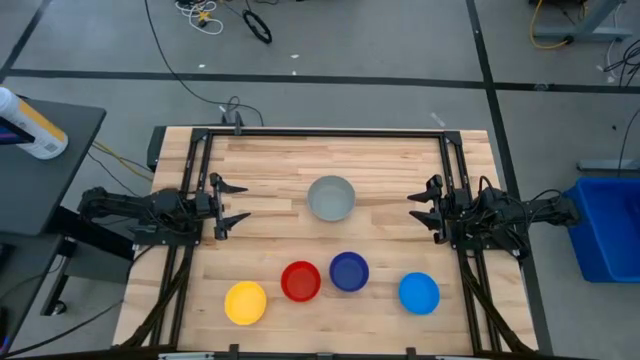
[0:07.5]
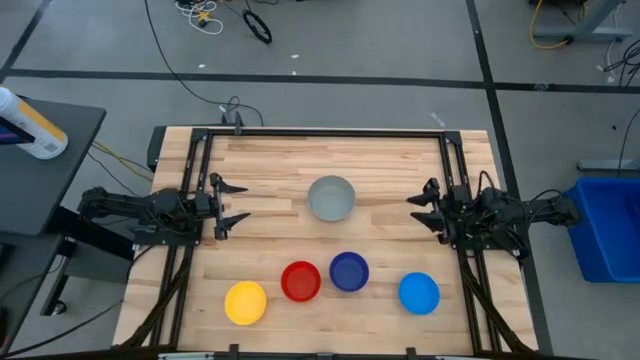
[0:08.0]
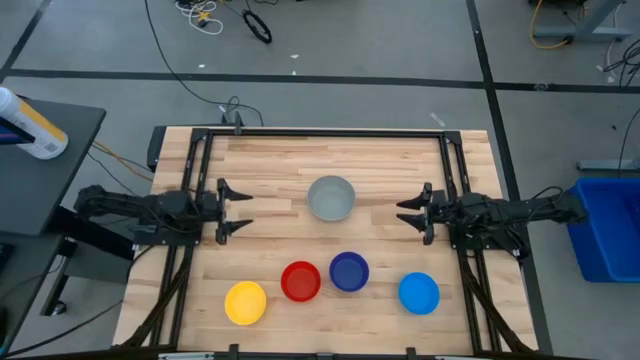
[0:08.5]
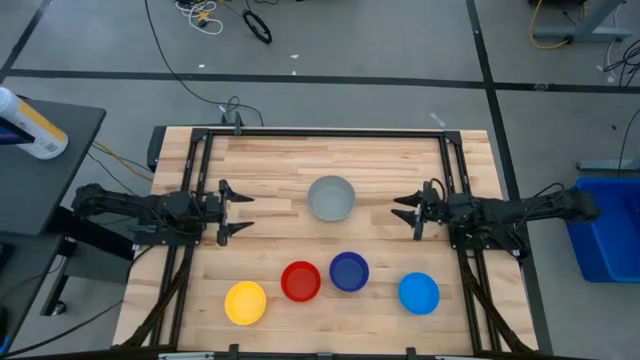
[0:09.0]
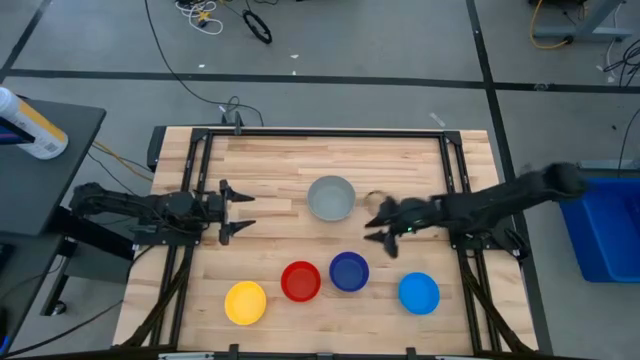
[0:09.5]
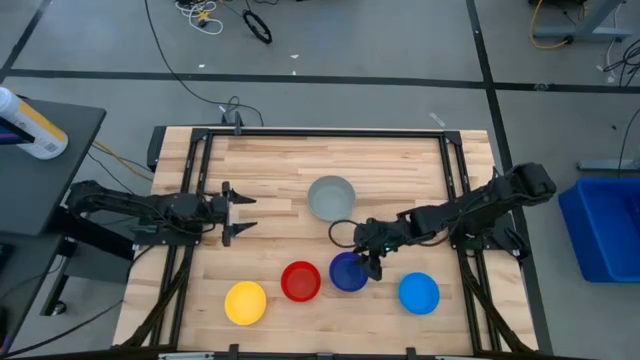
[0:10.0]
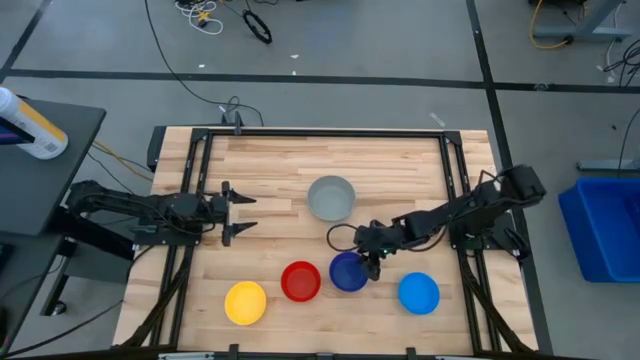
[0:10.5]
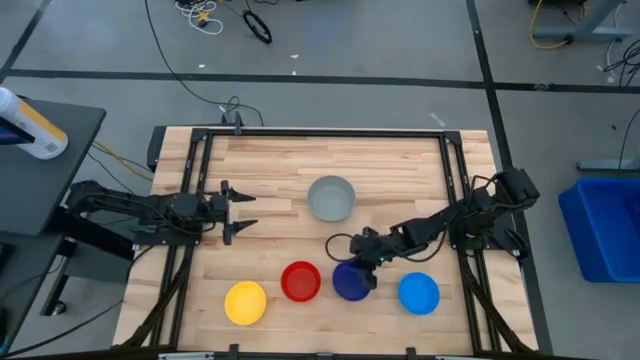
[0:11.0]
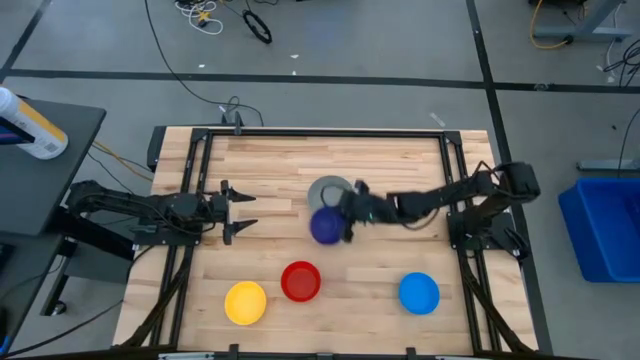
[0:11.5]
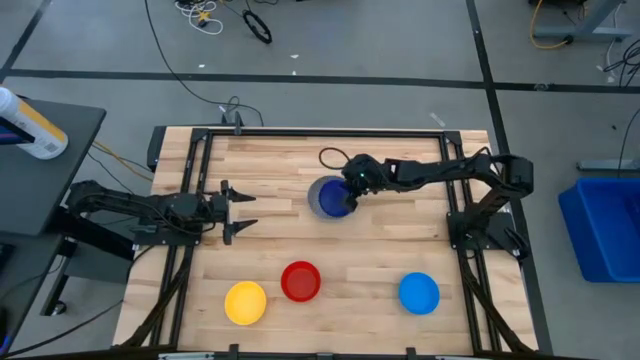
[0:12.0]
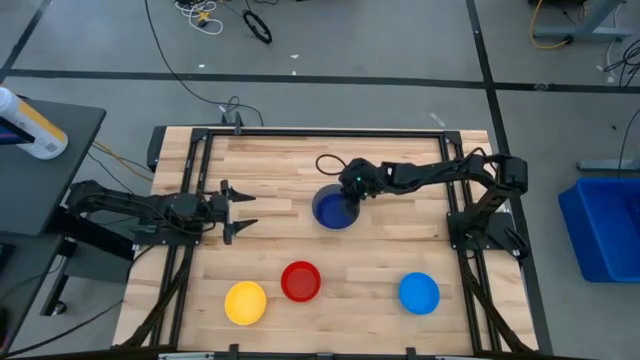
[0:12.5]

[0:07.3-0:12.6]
Stack the blue bowl on top of the gray bowl

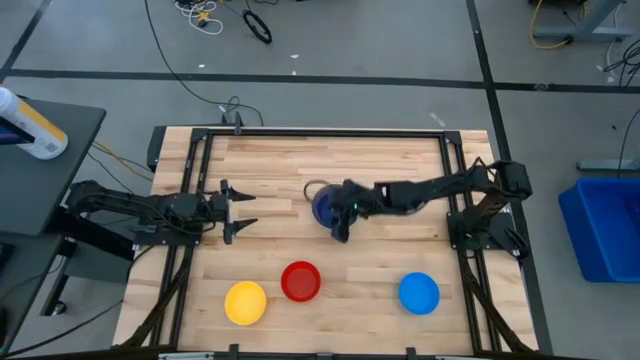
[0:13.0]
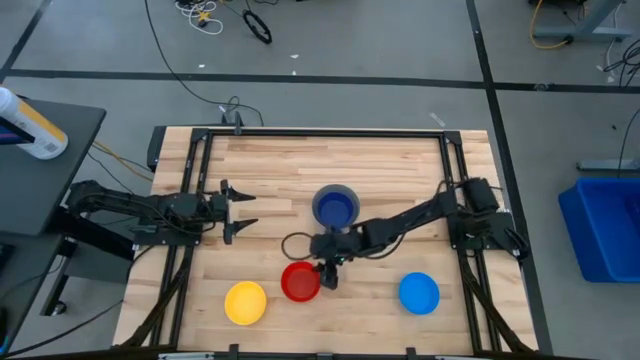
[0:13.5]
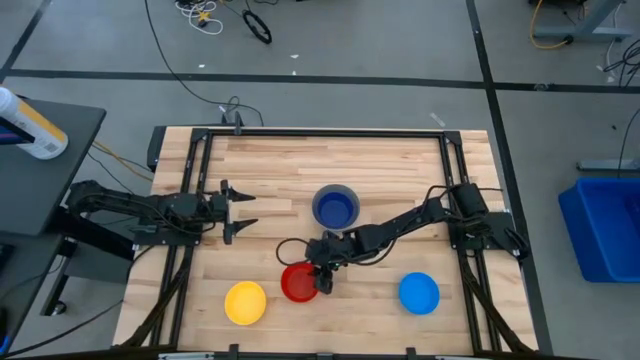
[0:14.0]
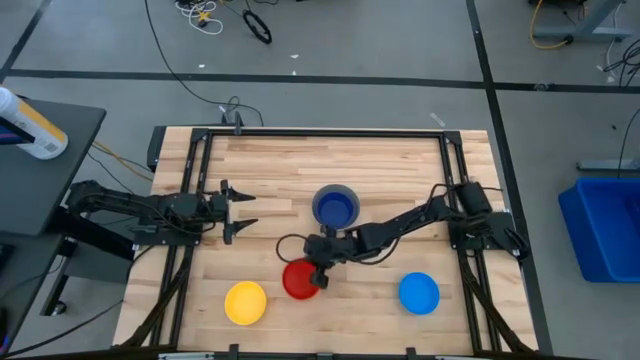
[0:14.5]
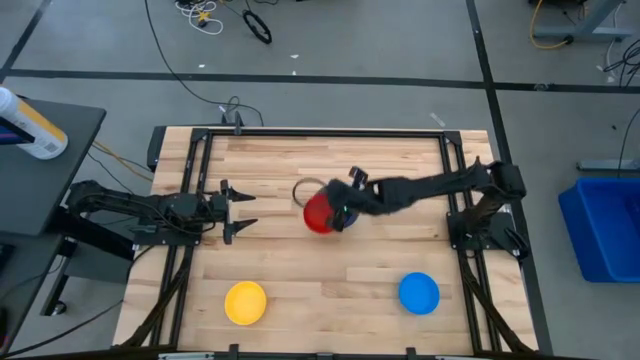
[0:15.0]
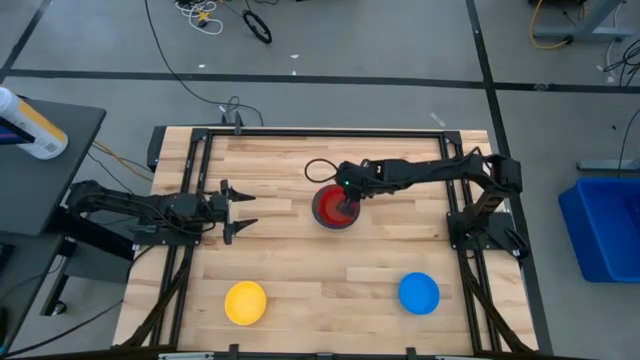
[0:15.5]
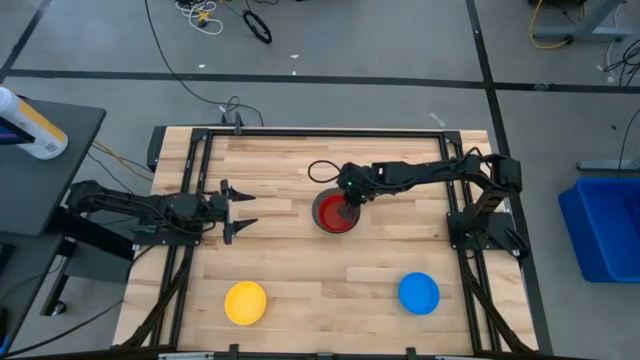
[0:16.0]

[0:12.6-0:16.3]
Stack the red bowl on top of the blue bowl

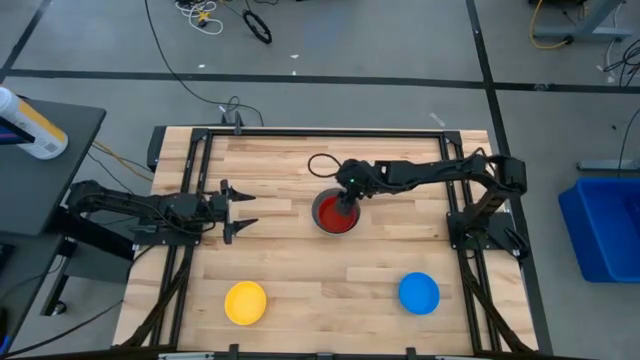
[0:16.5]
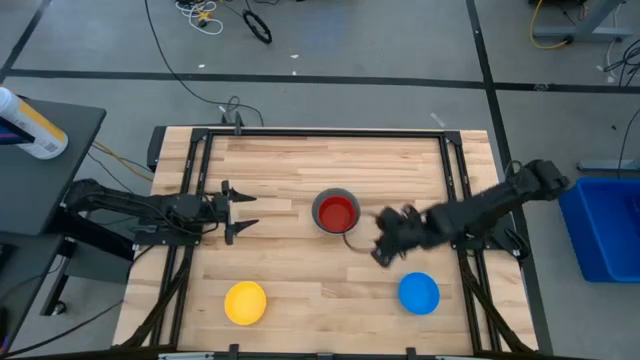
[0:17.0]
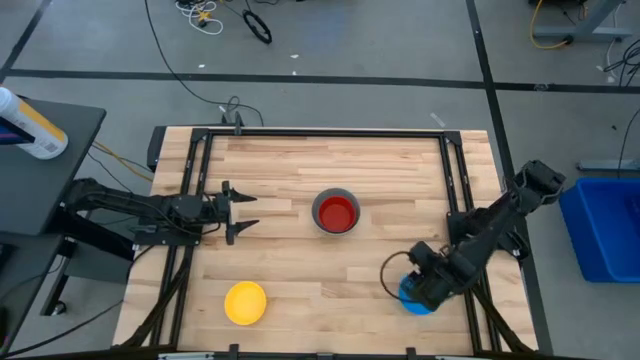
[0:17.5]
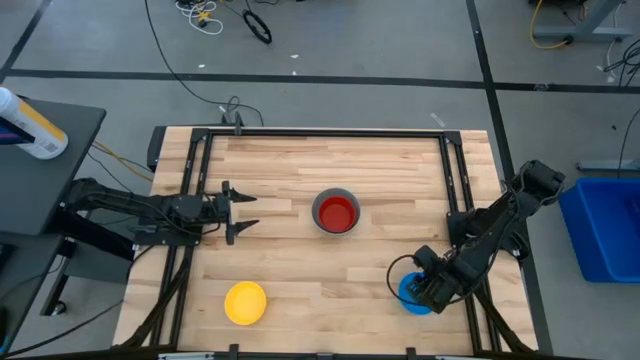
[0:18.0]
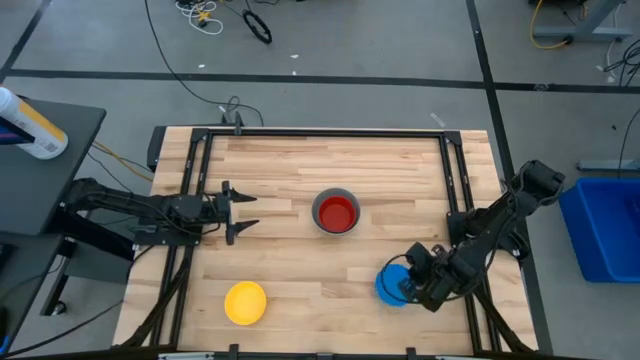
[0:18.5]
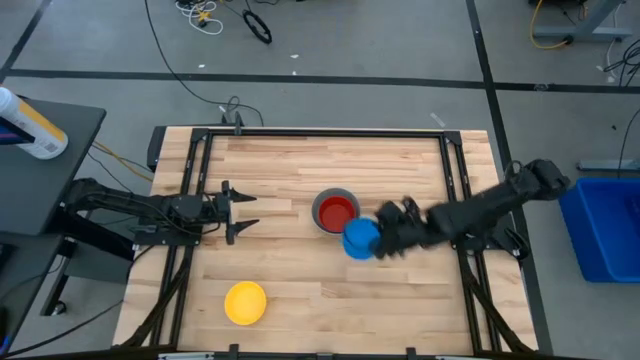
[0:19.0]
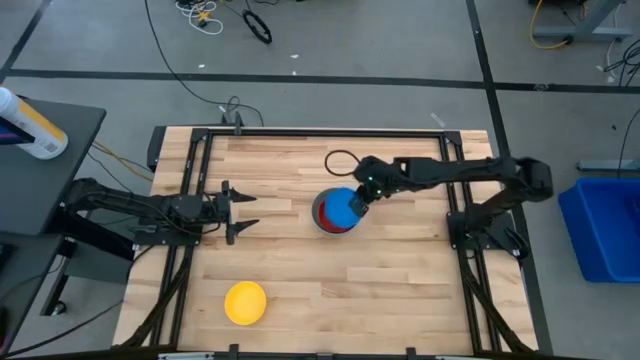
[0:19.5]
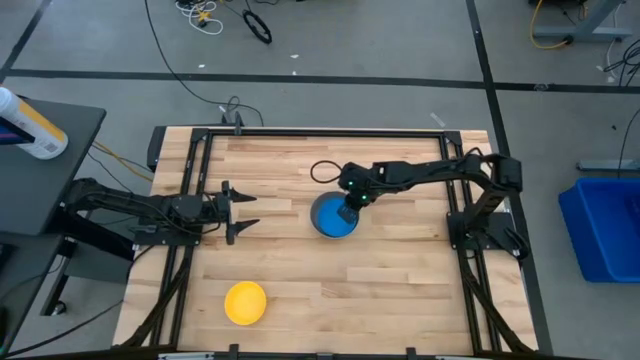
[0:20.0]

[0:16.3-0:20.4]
Stack the light blue bowl on top of the red bowl

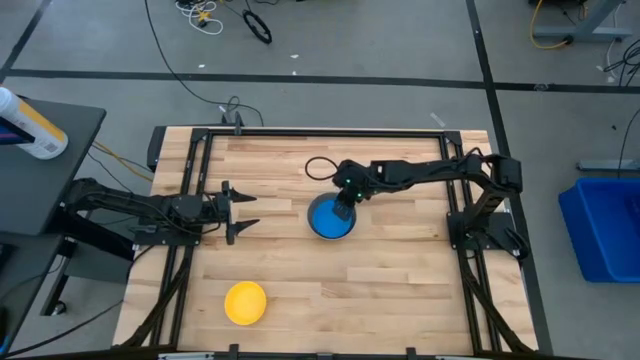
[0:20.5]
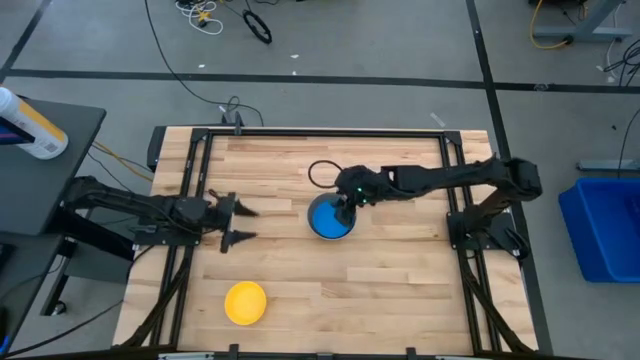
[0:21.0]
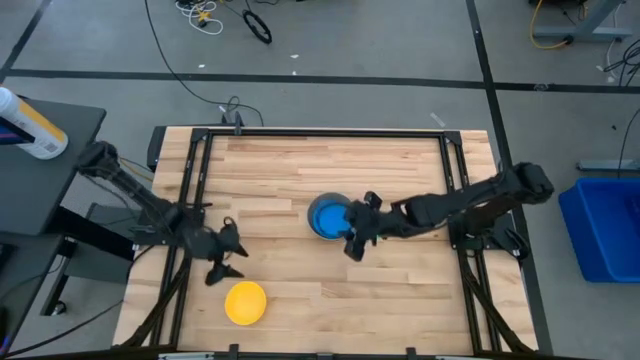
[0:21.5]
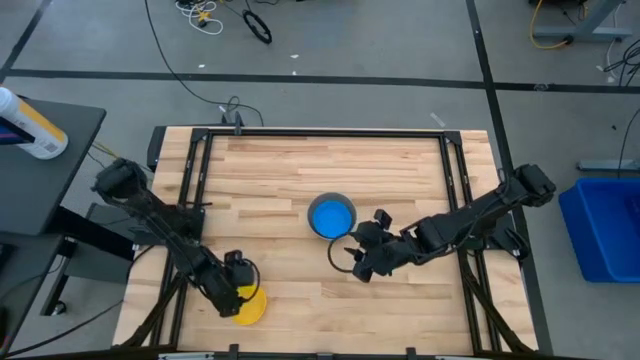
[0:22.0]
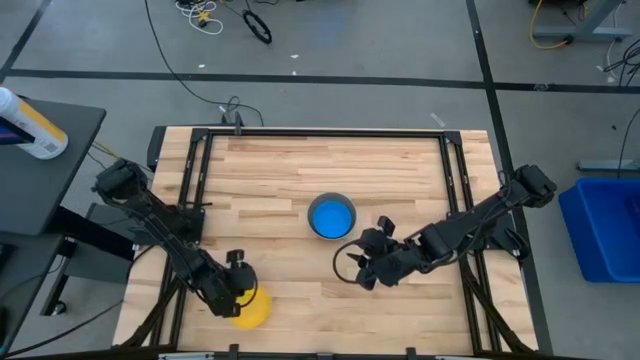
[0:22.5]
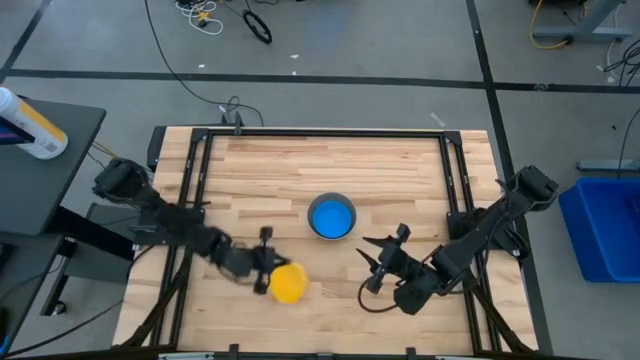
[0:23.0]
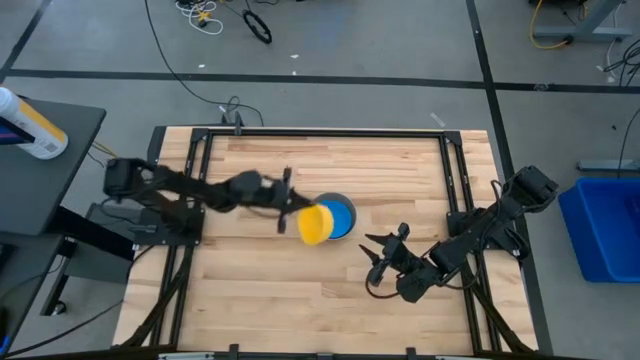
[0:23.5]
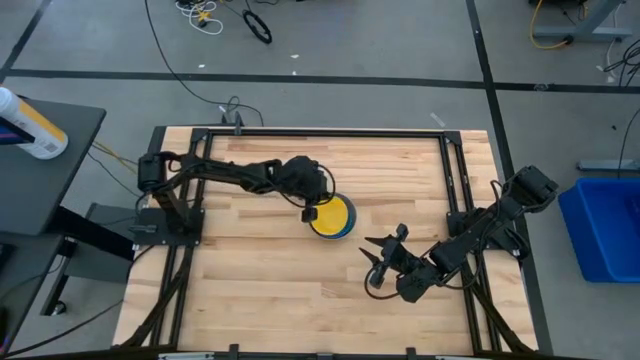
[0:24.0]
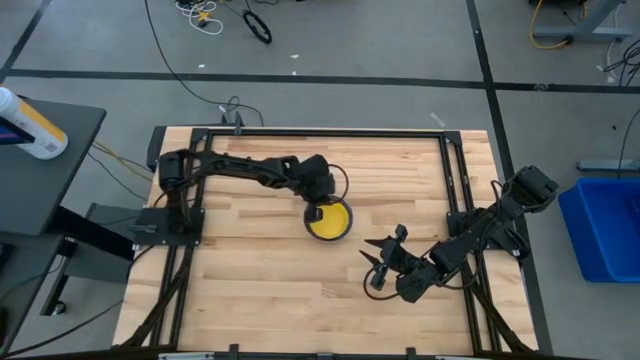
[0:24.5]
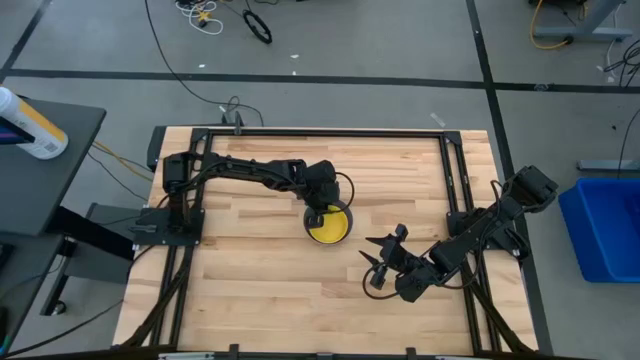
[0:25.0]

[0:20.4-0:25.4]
Stack the yellow bowl on top of the light blue bowl
